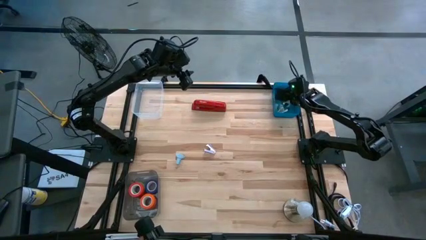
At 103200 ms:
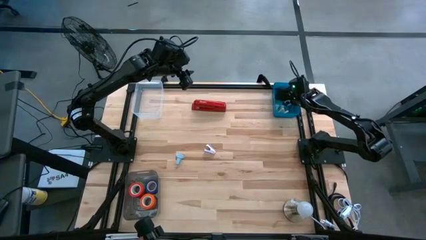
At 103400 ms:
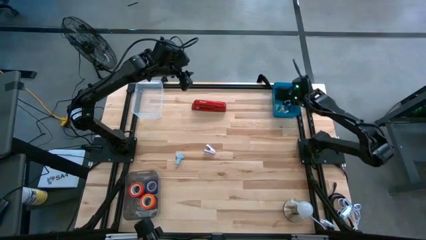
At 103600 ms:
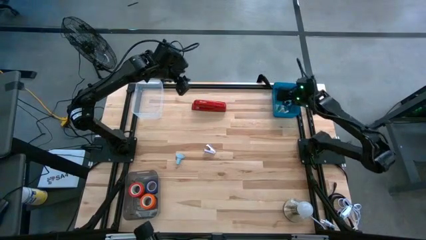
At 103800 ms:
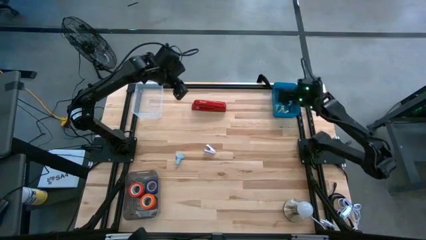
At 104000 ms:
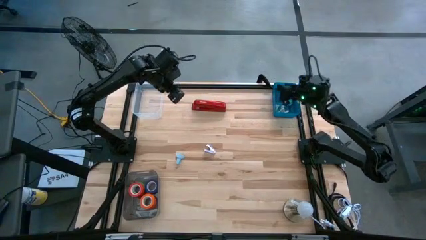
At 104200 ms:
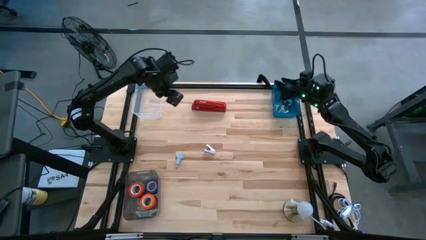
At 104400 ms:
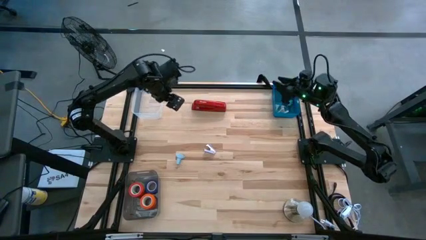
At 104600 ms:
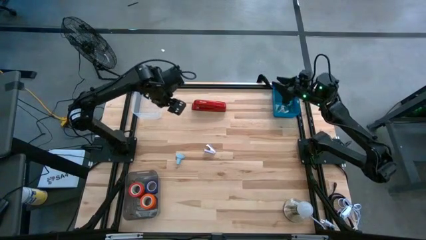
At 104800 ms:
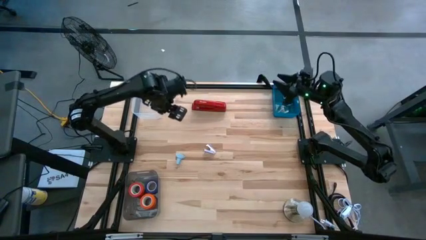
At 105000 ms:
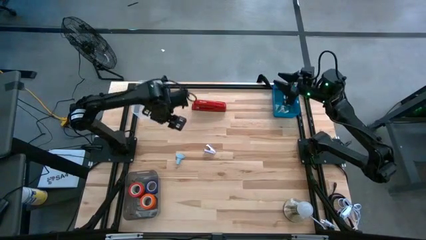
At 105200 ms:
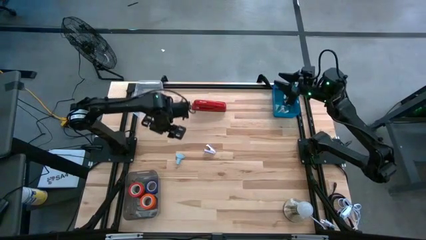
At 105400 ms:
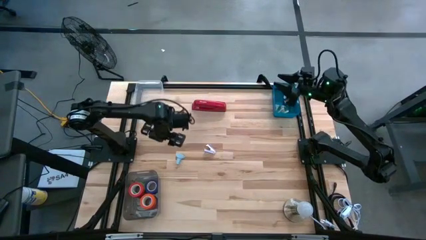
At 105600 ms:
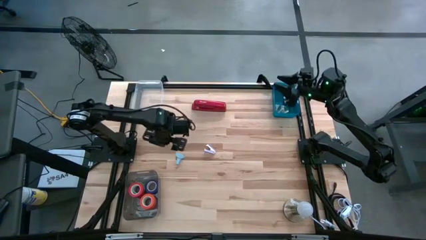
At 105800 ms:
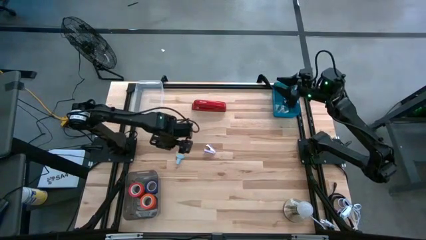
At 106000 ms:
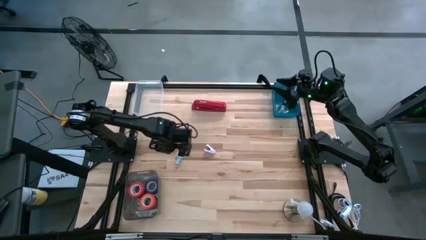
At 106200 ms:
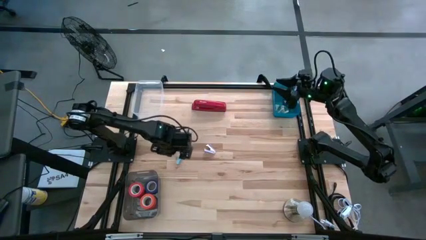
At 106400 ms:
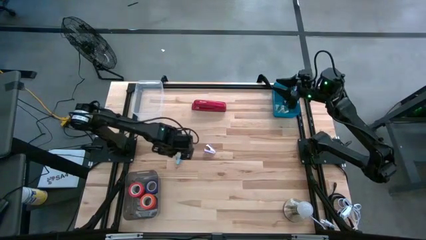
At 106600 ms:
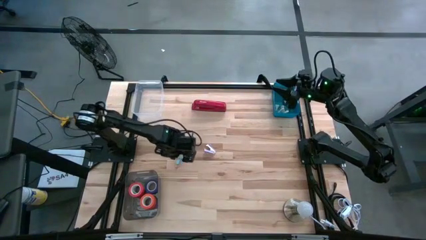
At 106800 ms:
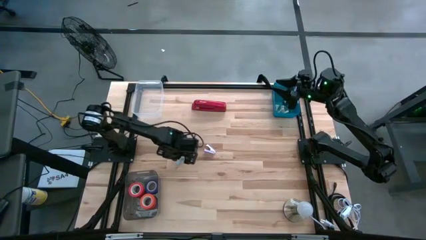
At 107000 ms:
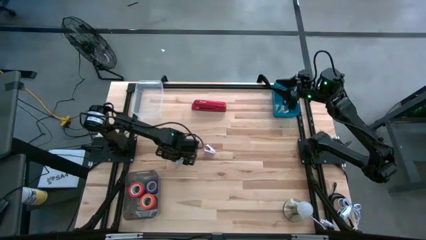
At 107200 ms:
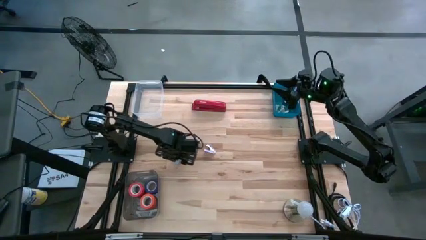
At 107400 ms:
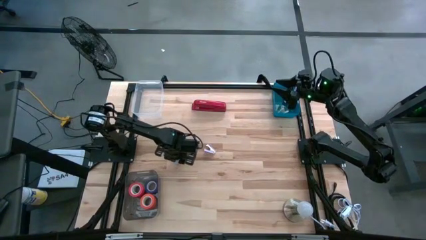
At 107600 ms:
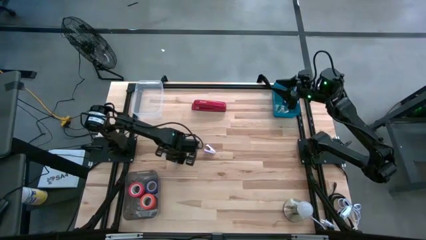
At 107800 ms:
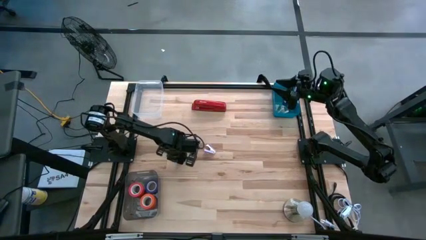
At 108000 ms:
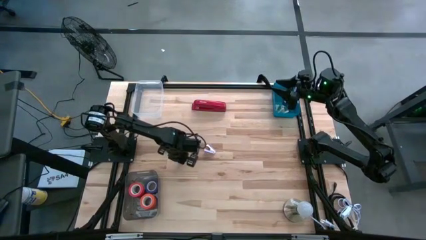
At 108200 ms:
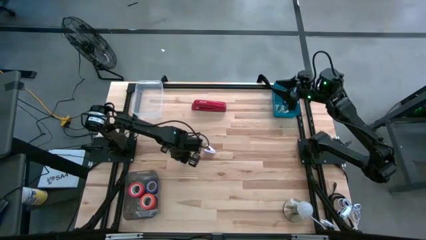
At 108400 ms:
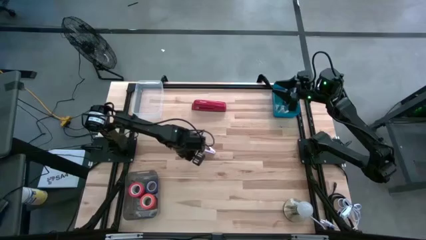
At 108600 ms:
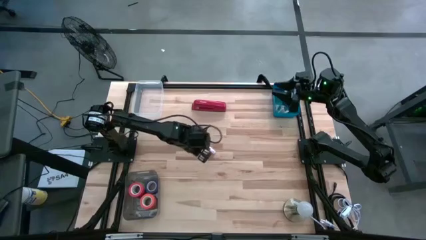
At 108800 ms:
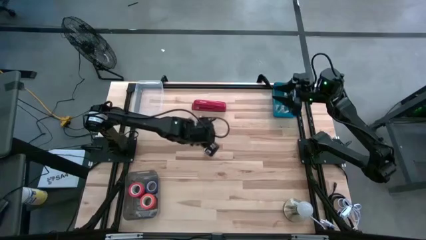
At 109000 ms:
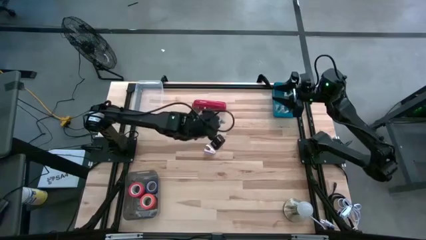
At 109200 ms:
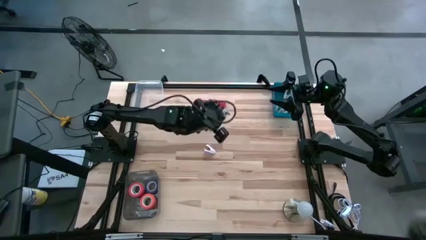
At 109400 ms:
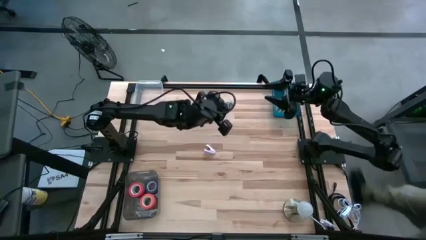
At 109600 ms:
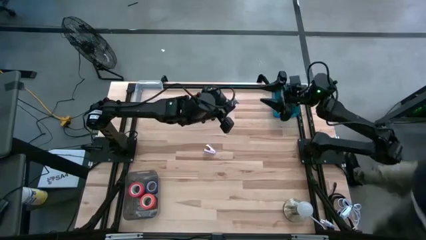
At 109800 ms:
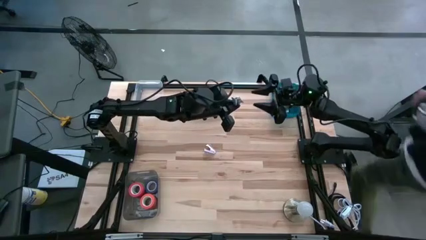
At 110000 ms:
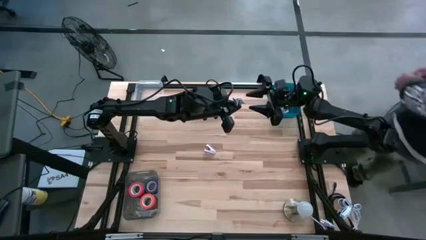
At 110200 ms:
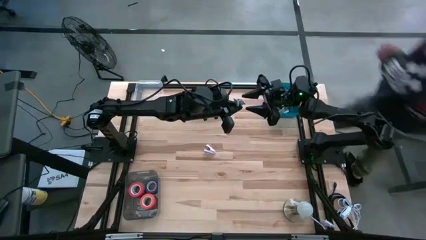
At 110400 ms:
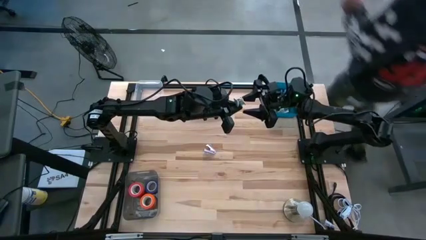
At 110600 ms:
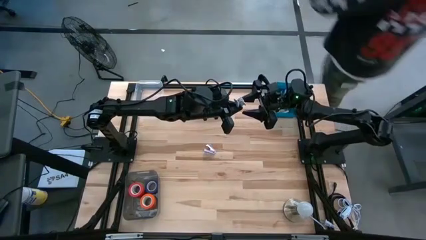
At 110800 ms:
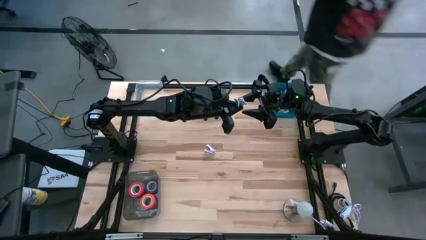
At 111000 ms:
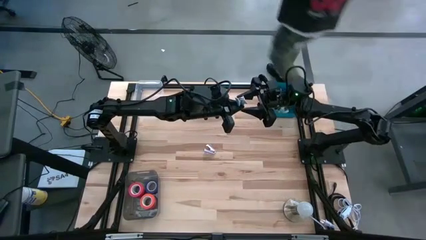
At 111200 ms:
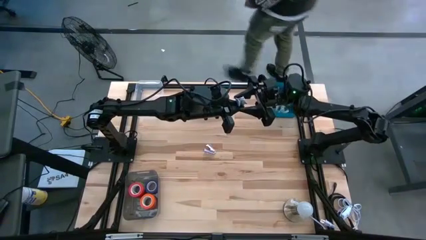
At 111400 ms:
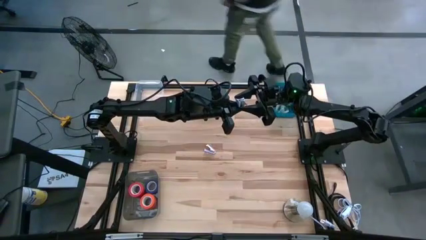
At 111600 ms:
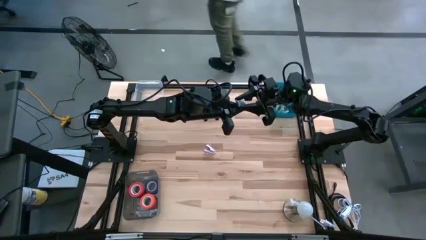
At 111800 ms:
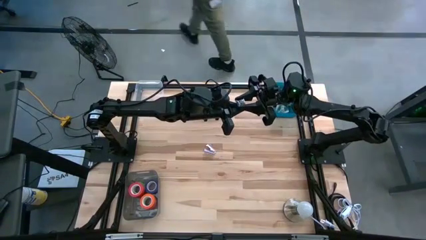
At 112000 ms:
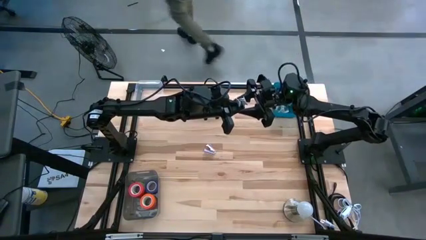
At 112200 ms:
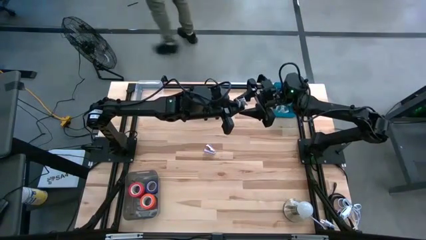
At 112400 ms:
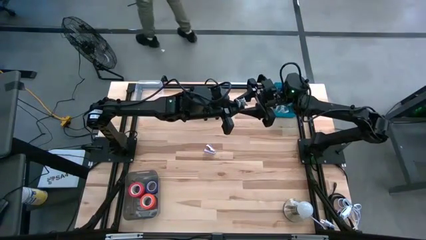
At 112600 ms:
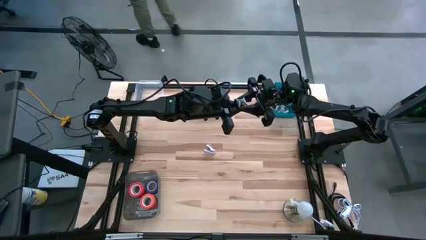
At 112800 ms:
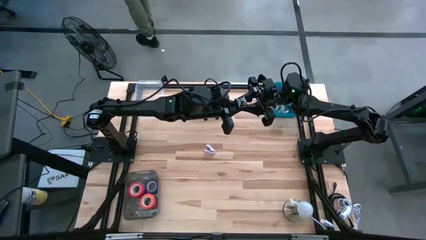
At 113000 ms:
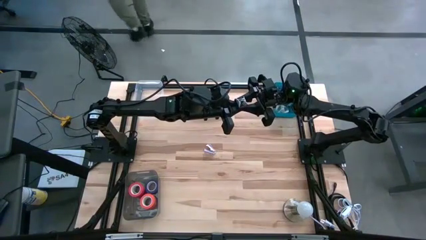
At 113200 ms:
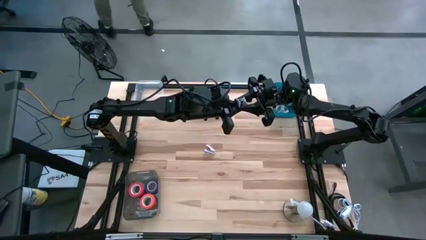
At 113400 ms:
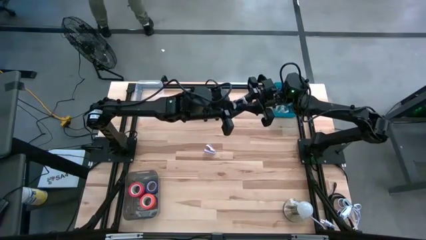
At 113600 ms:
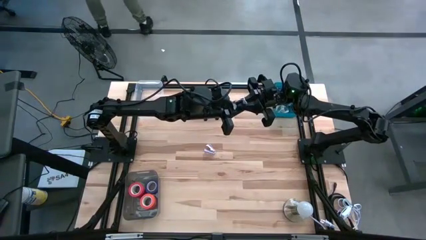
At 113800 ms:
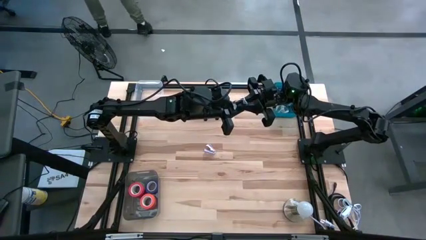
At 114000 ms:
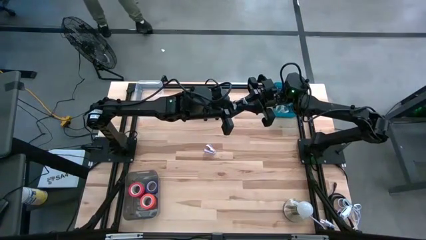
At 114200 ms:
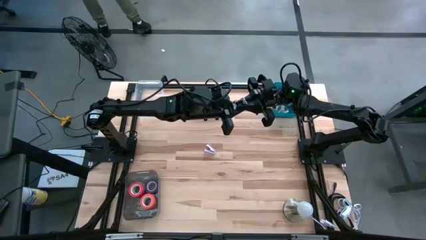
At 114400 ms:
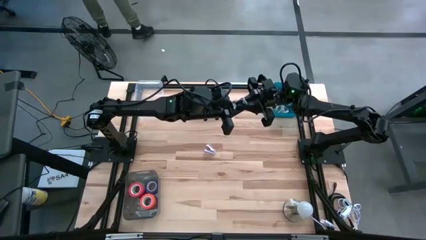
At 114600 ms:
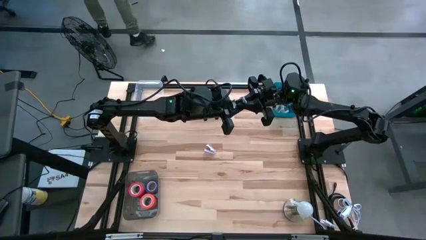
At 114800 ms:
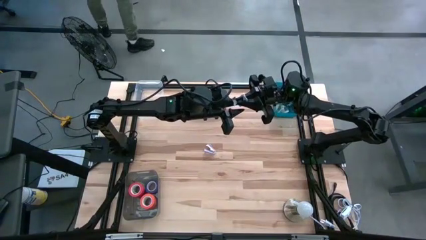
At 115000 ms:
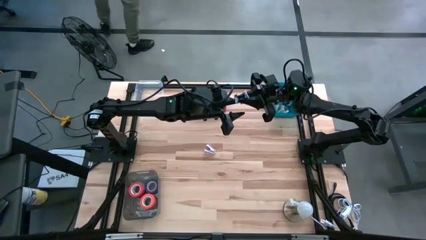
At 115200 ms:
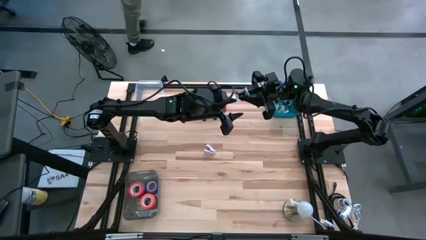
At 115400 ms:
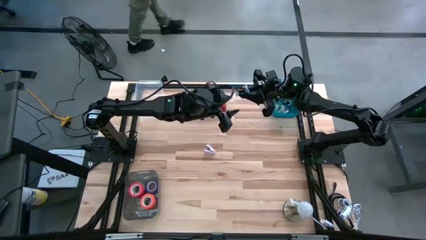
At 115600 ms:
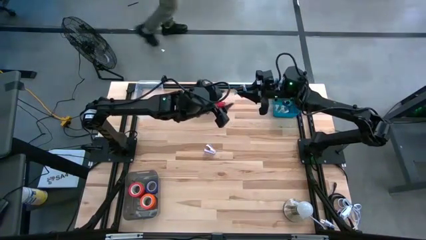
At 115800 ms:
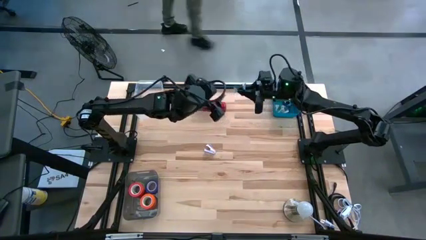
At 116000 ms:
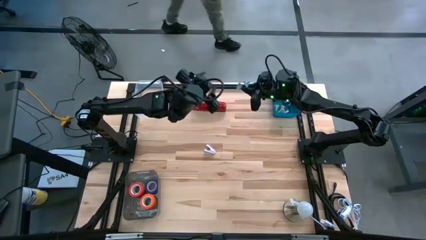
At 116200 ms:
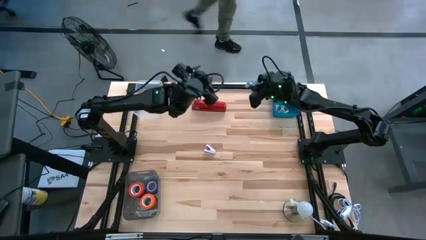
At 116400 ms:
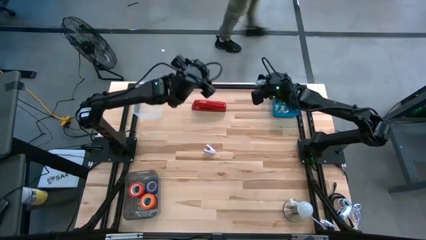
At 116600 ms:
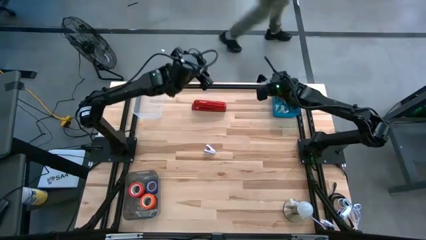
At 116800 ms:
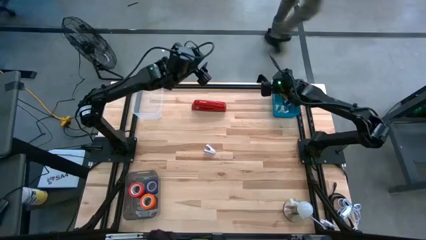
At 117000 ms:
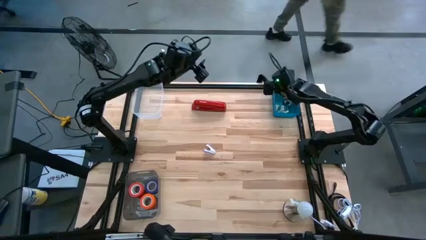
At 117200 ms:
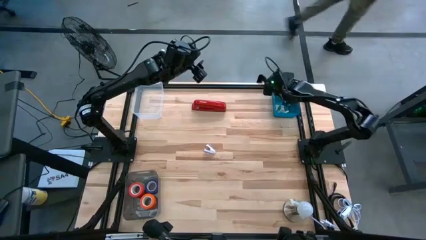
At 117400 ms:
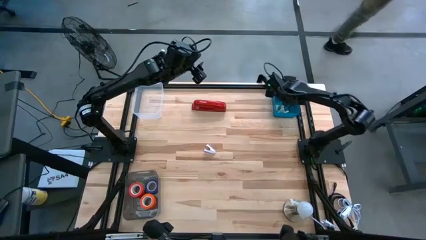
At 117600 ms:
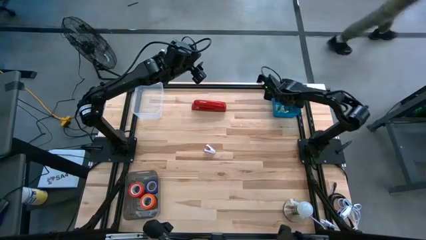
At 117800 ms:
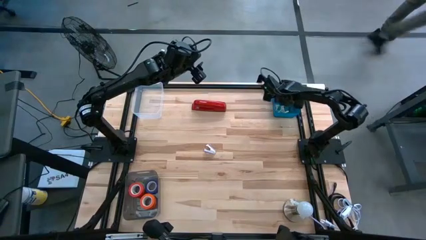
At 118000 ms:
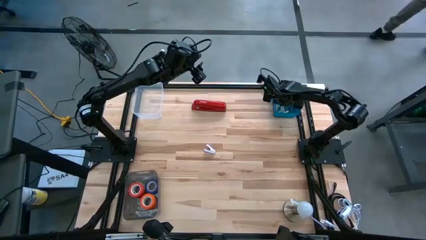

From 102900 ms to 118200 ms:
Task: Pick and place Stapler, Stapler remover, tape
Put the light blue staple remover into the blue bin
